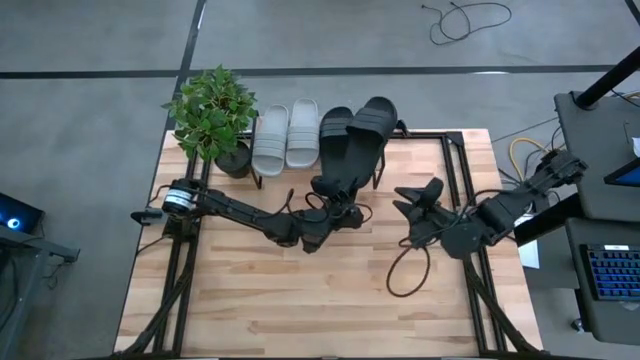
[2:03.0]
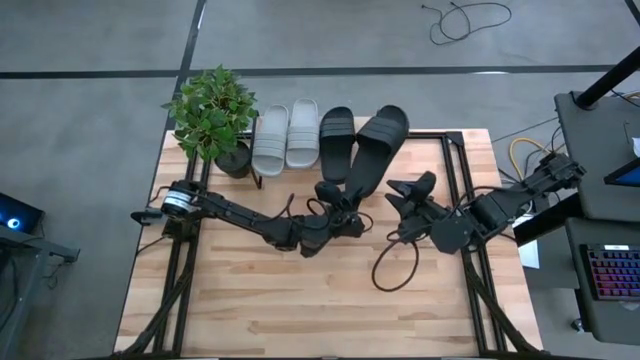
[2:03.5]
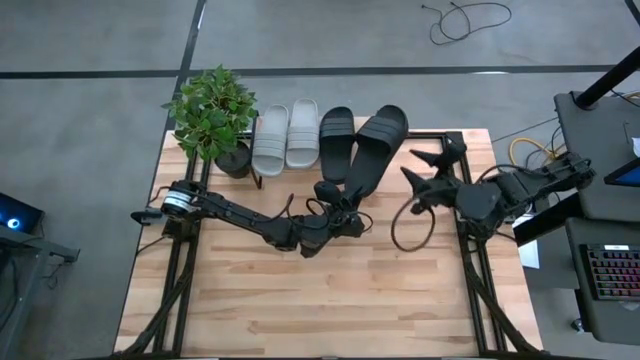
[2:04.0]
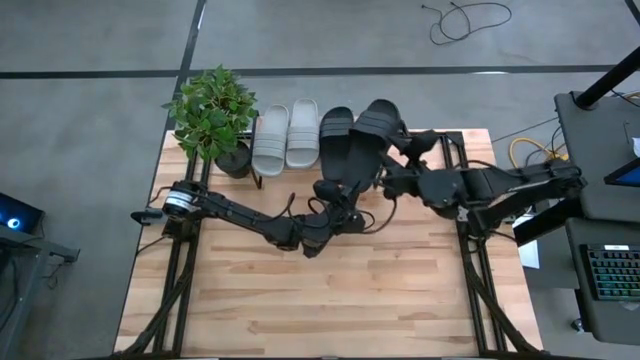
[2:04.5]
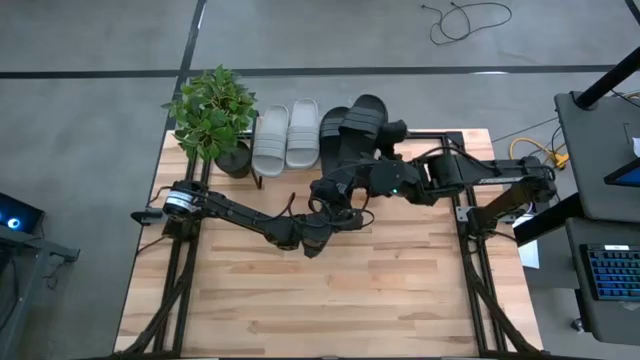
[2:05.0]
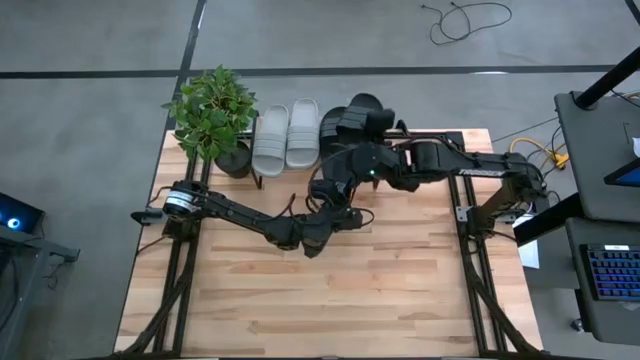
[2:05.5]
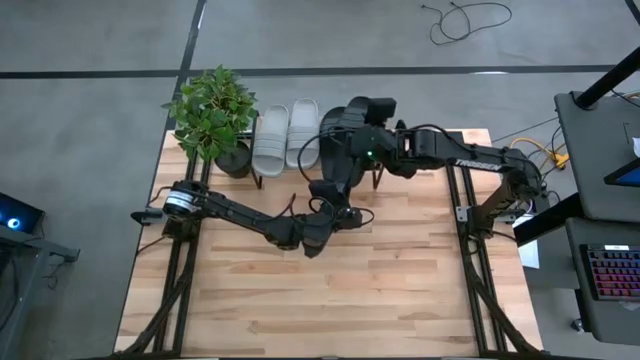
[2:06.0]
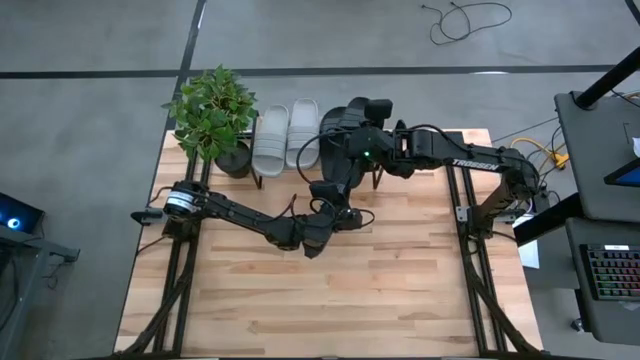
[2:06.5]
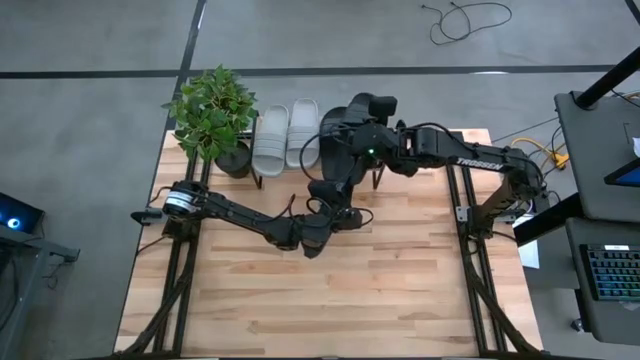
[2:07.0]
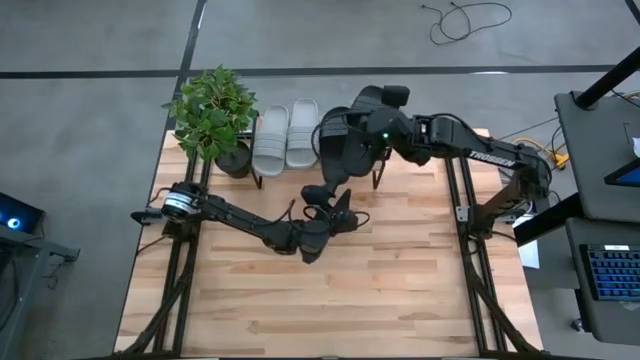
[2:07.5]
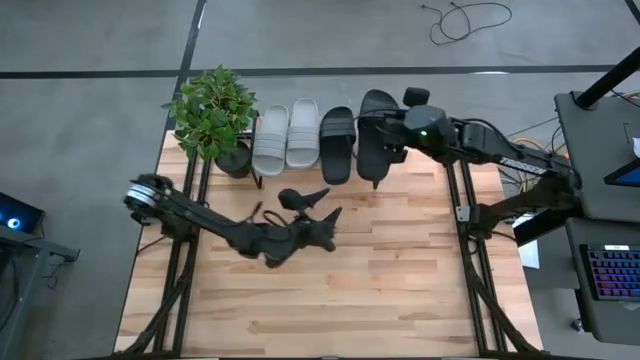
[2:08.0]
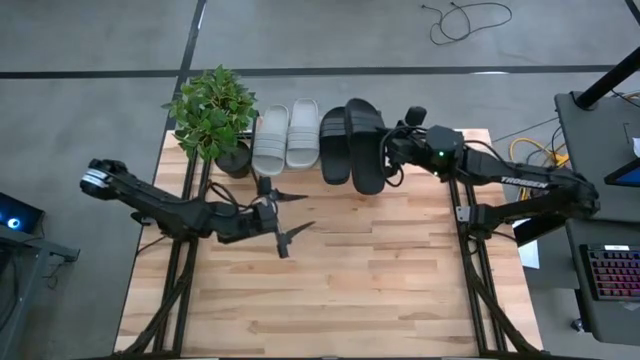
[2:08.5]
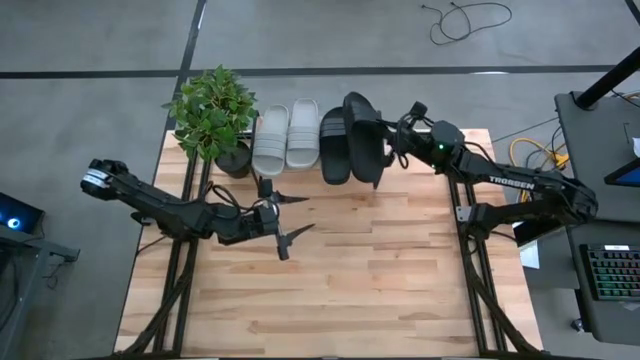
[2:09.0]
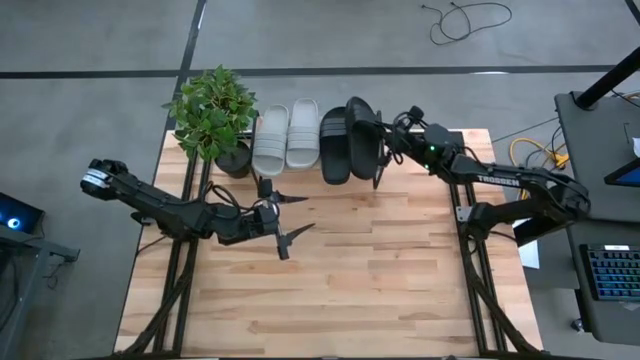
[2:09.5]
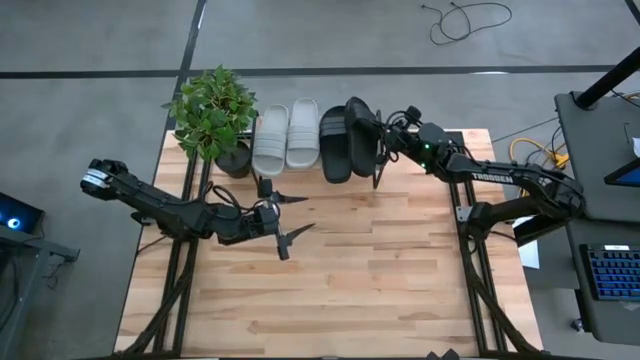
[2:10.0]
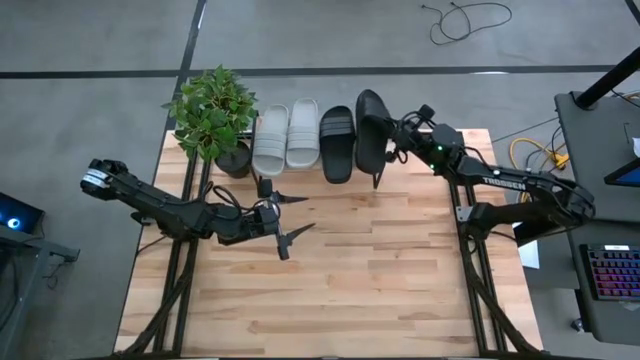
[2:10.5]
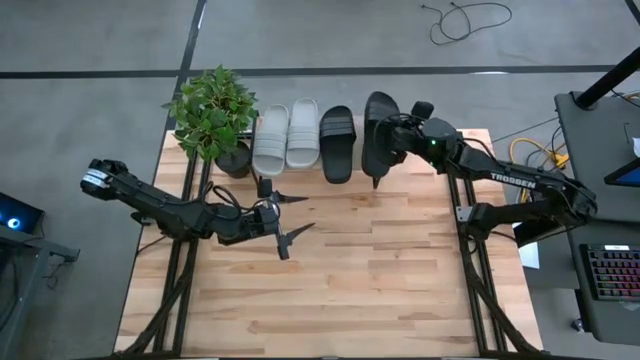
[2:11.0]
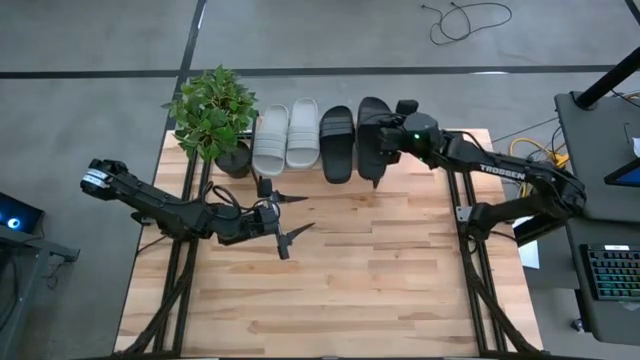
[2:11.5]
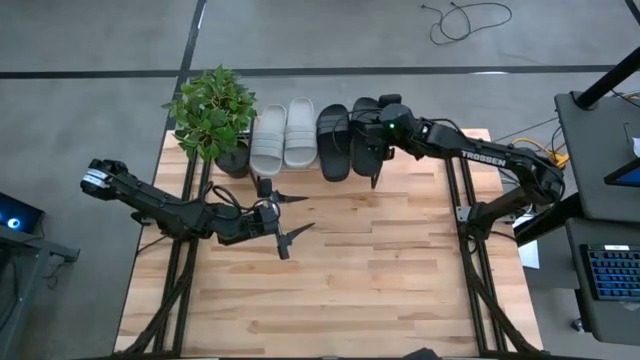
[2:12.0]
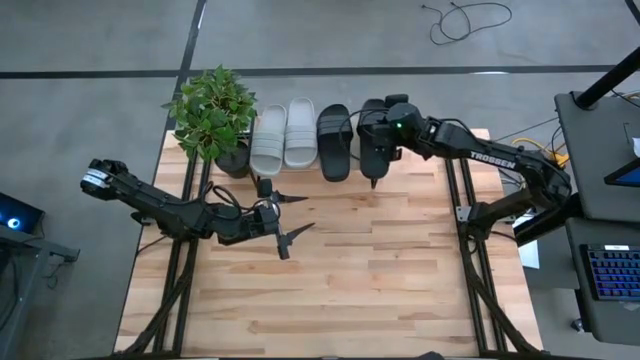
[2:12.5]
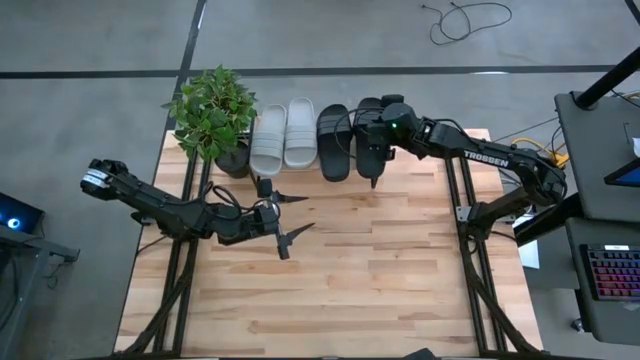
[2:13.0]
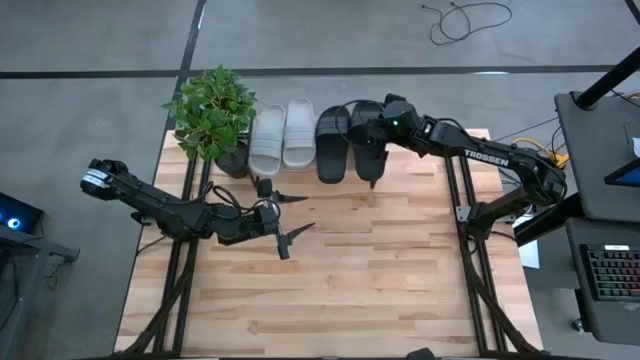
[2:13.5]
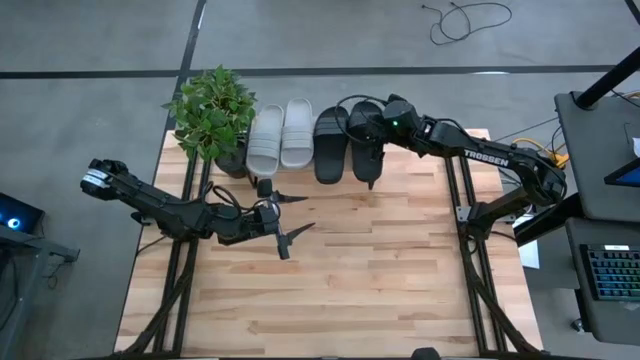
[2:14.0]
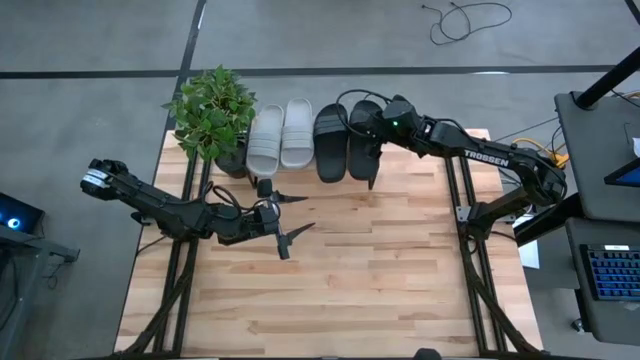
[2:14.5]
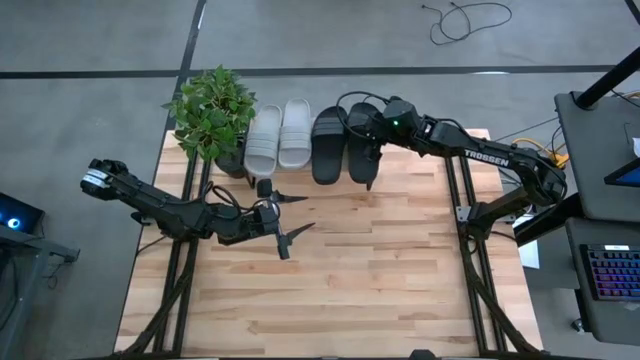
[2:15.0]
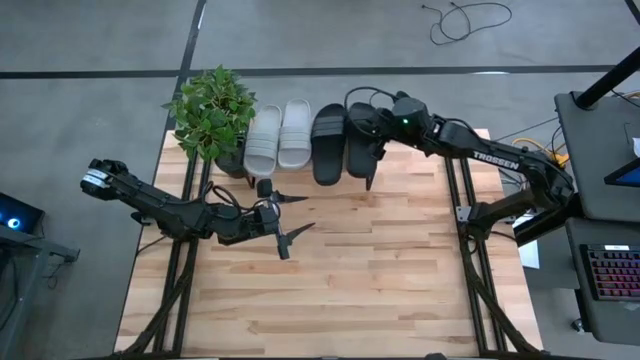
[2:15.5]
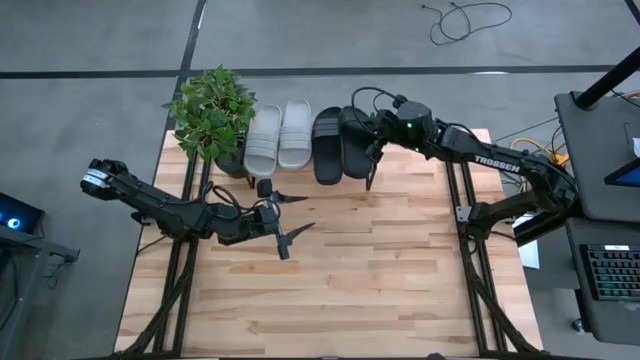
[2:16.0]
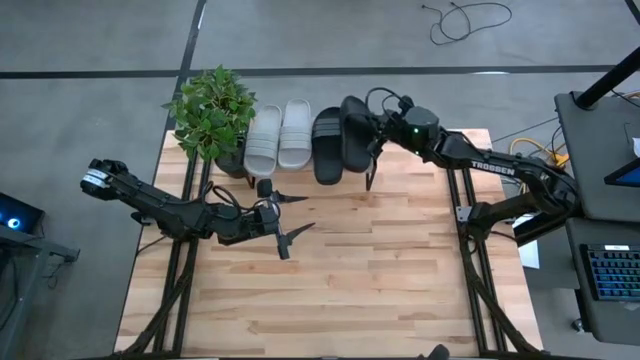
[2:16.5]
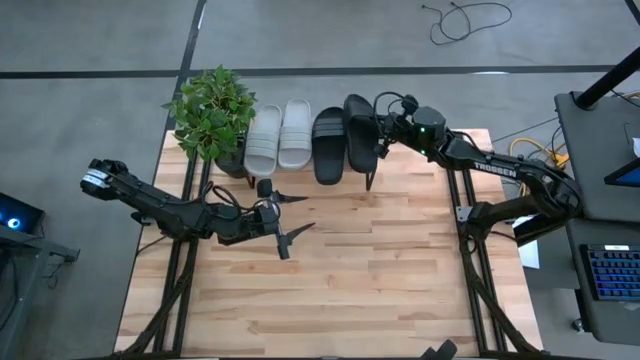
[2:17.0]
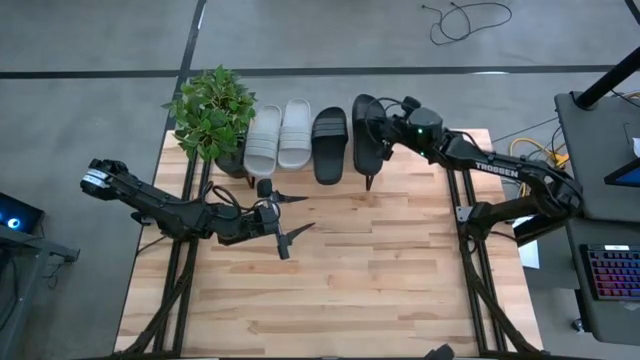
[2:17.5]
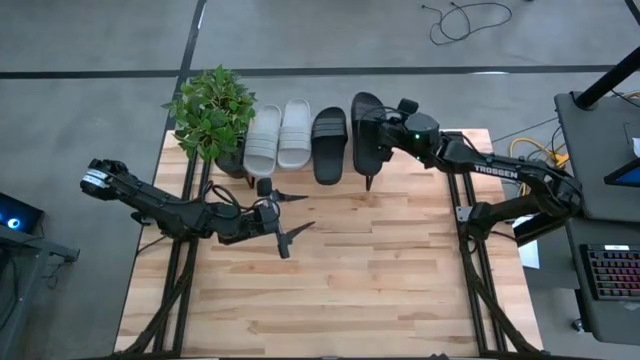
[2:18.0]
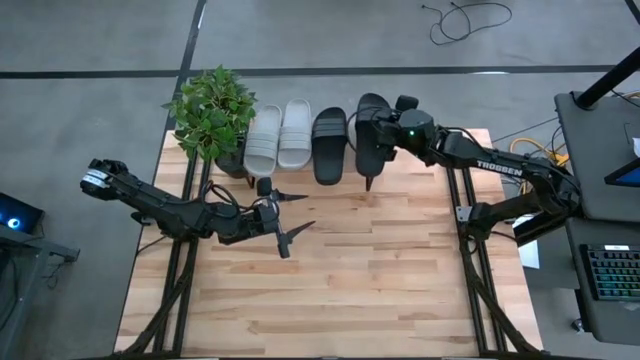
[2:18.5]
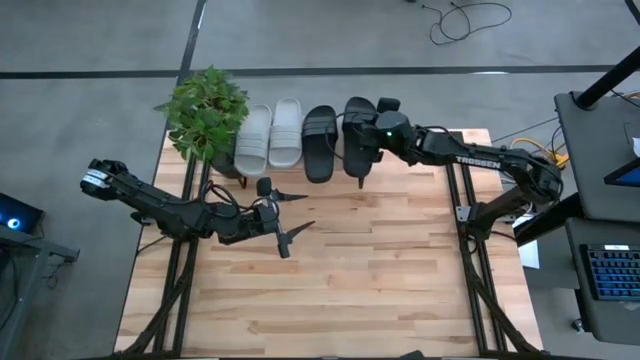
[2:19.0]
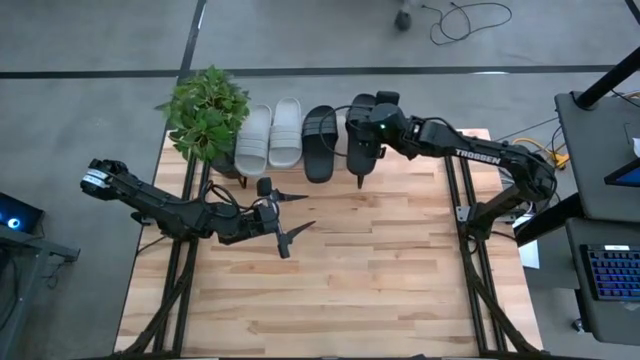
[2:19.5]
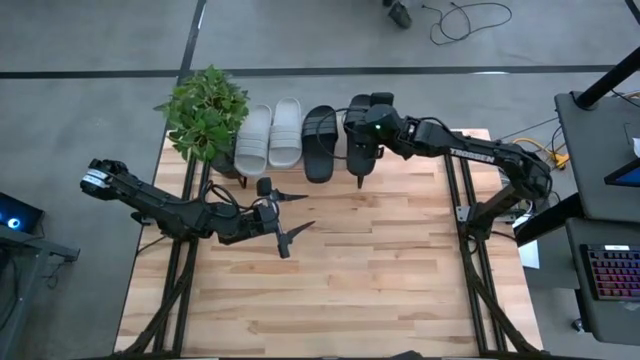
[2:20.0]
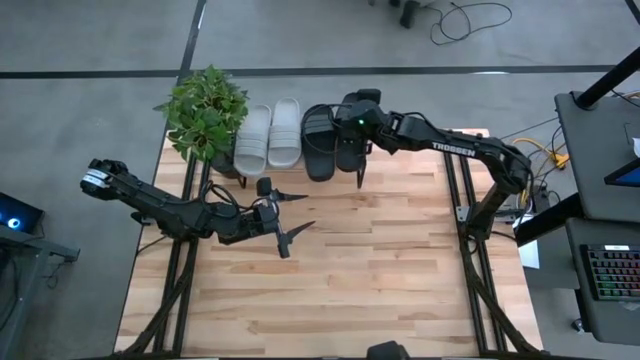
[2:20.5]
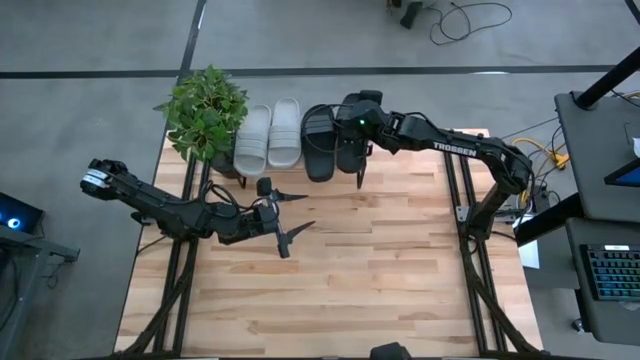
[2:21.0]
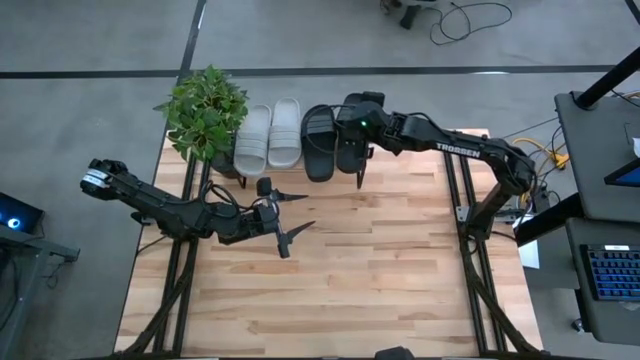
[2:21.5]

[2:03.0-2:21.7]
Task: Pick and place slides into the shelf
Put the black slipper on the shelf
